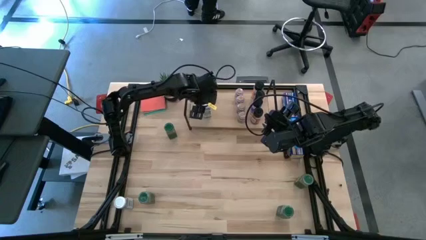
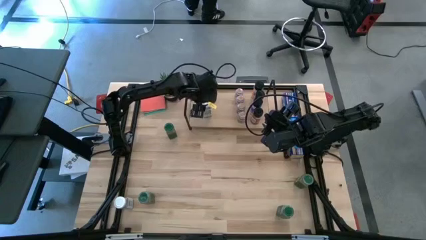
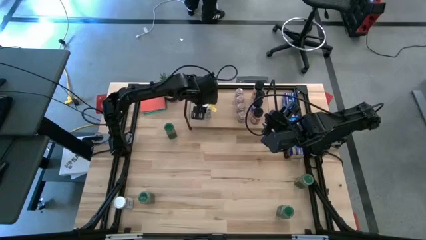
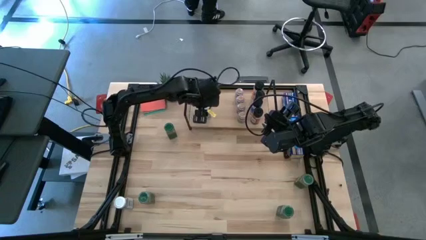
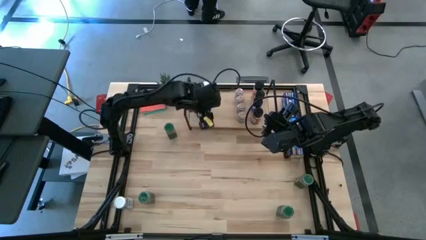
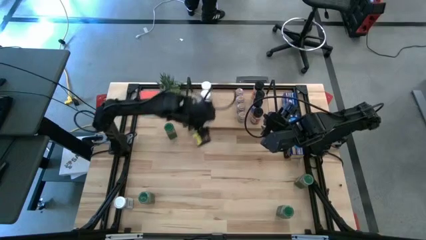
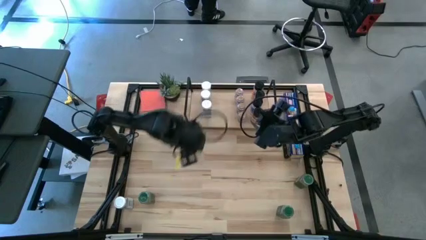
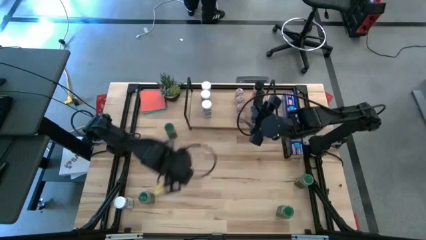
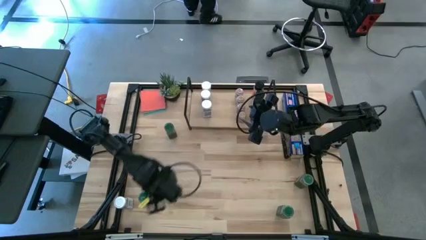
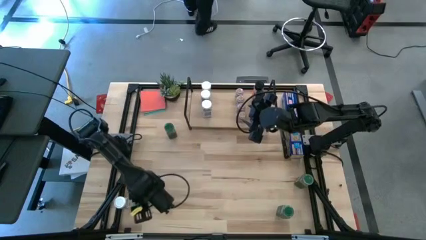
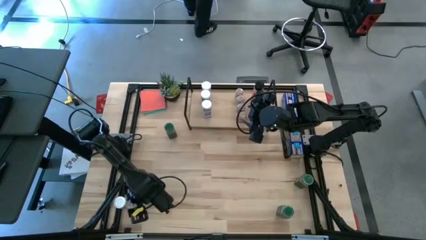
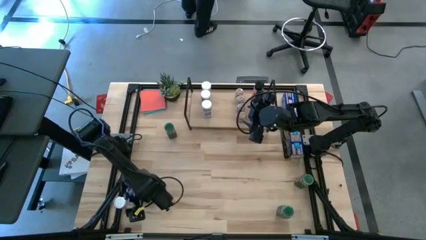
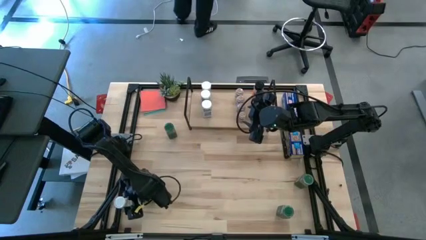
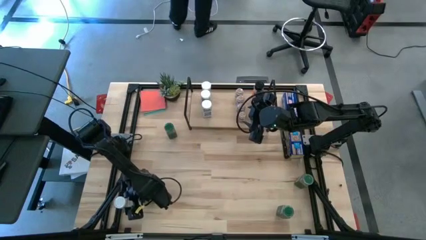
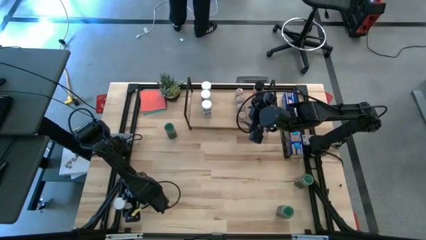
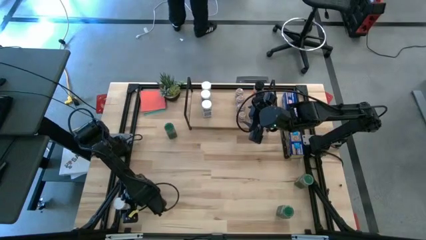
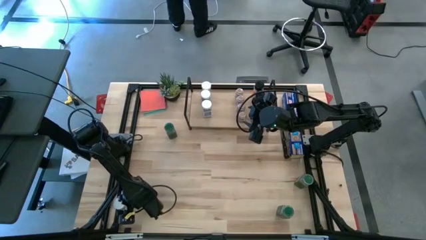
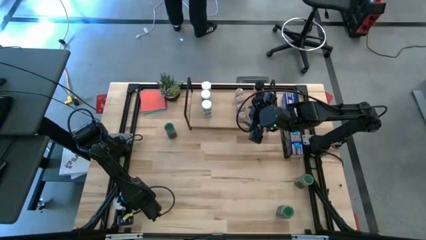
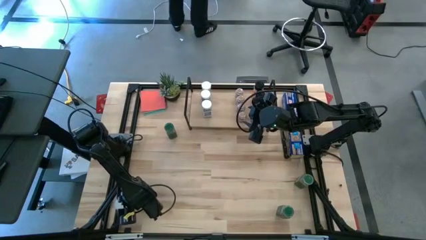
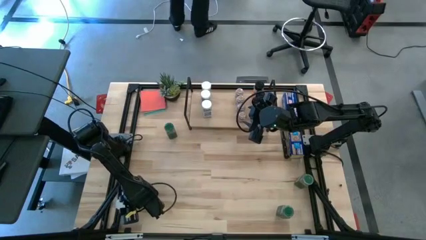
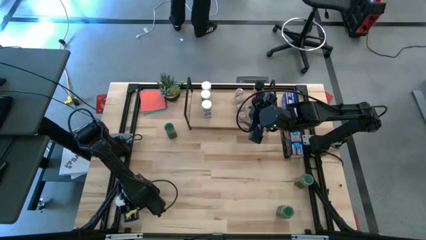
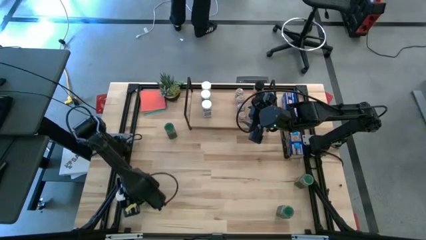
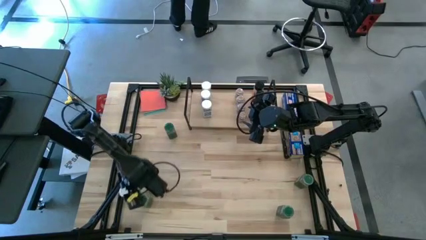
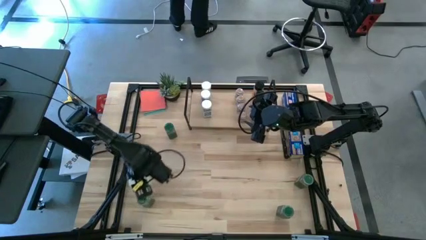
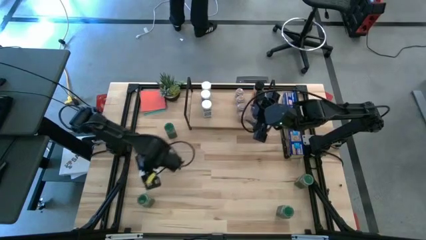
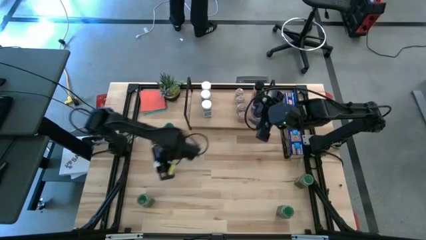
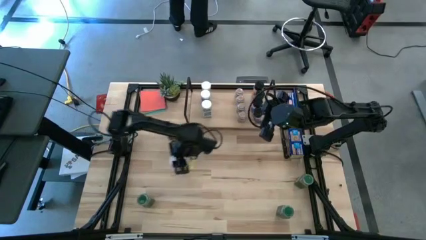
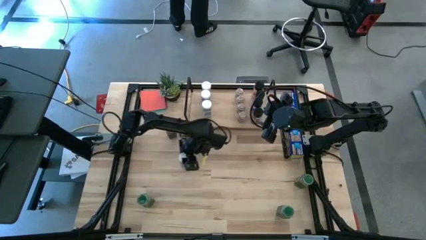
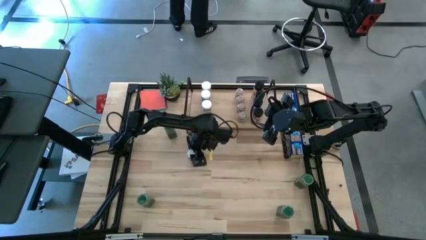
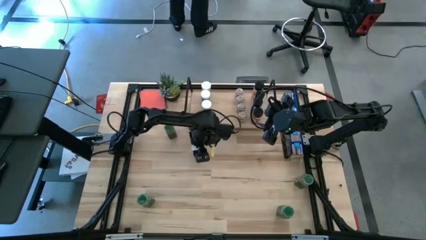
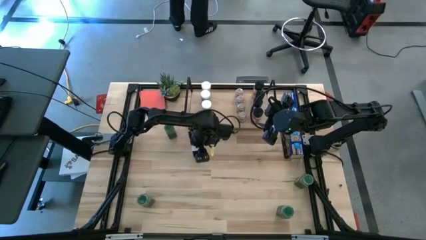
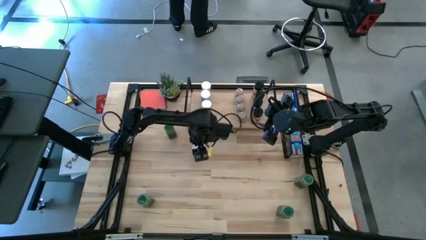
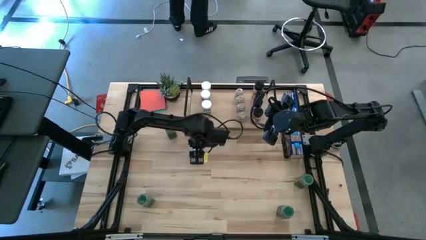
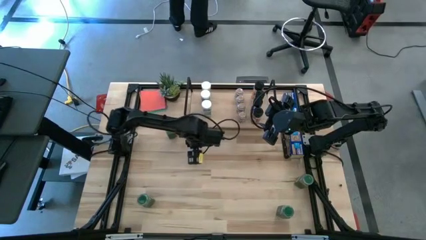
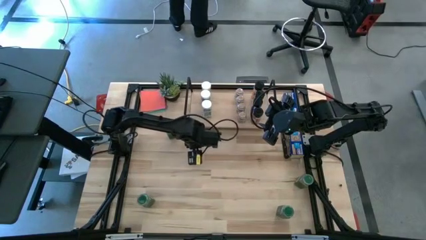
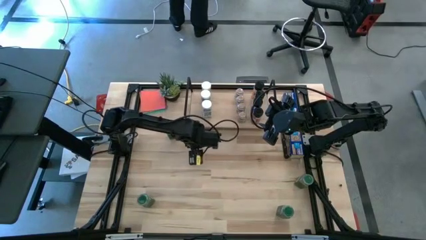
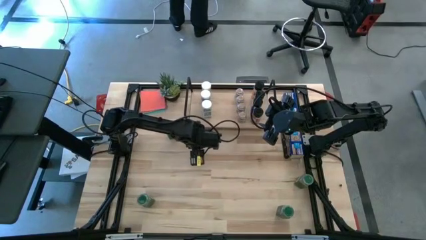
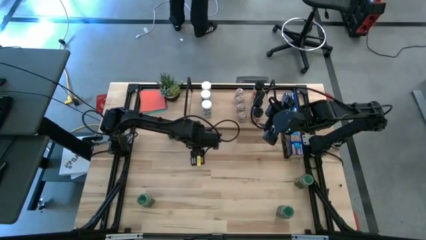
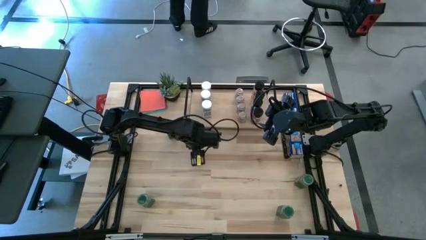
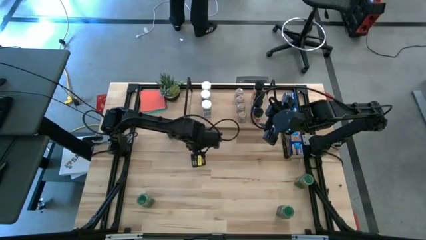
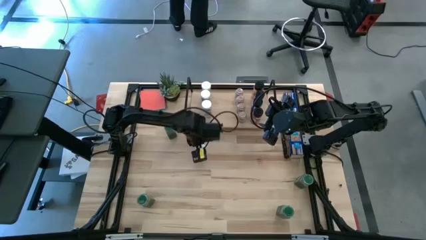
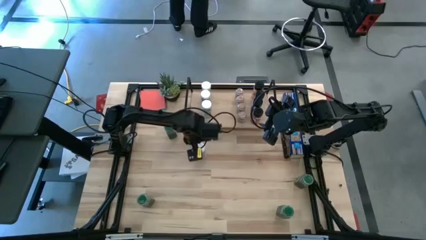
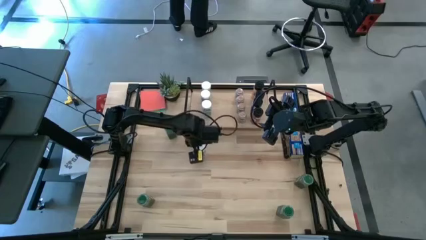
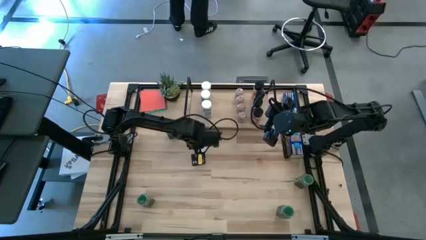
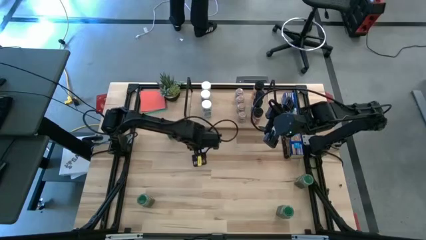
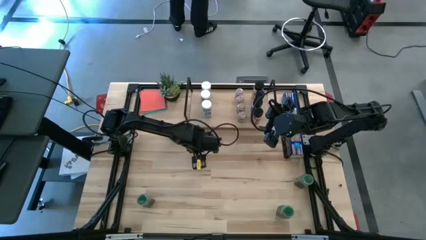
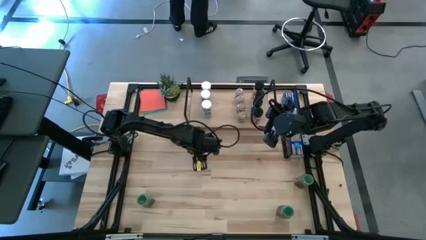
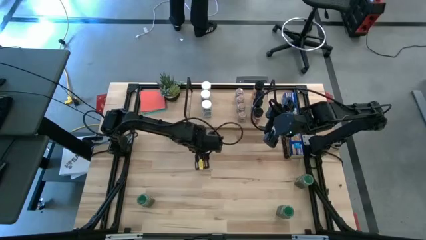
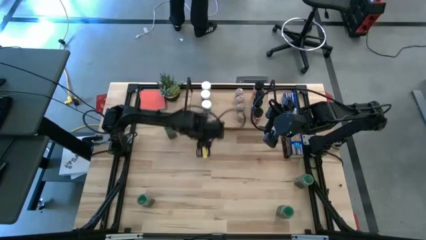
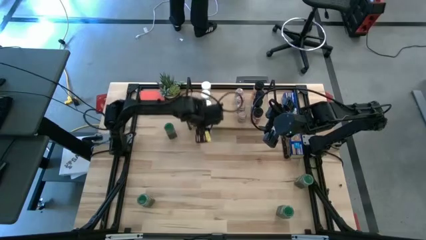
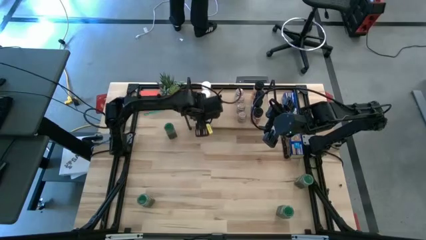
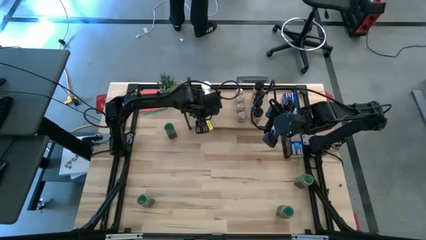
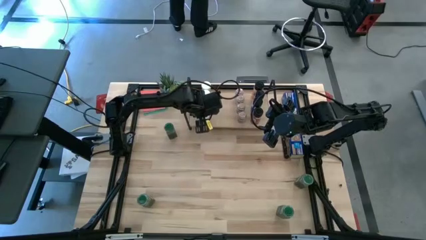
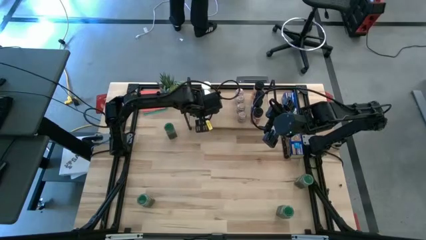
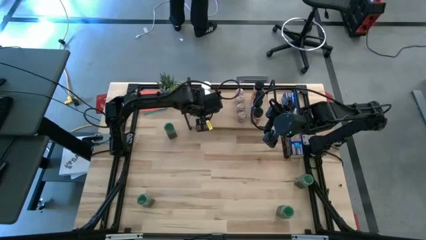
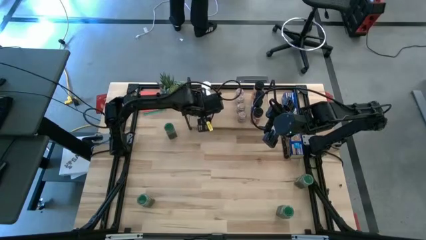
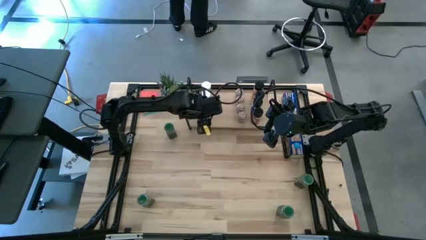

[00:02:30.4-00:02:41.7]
Task: Shelf spices
Put the white seasoning bottle on the shelf, aligned with the other white seasoning bottle

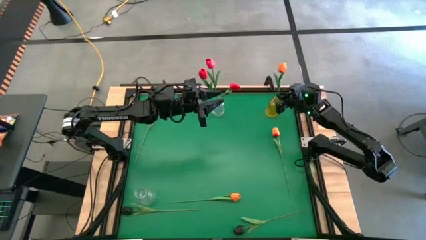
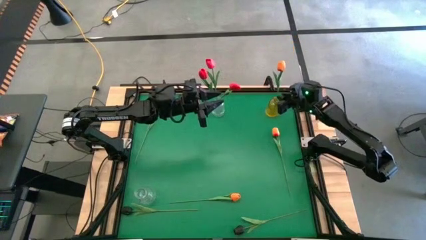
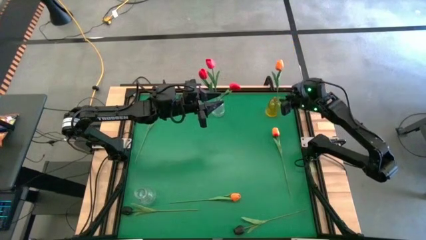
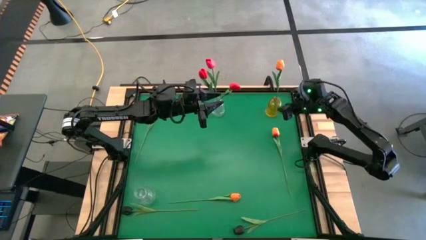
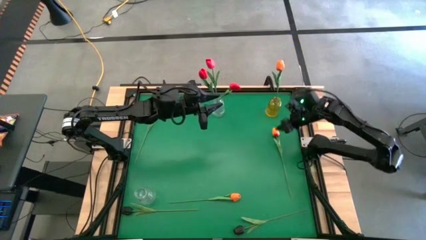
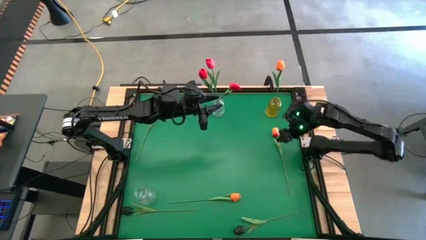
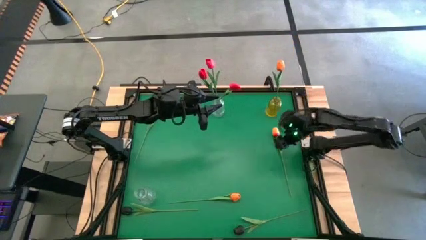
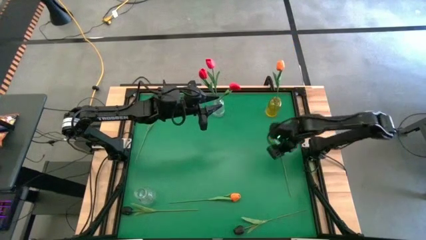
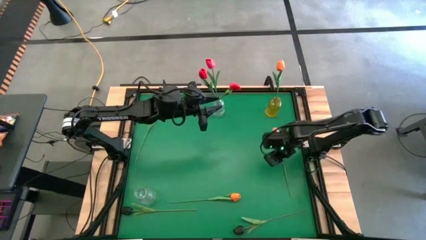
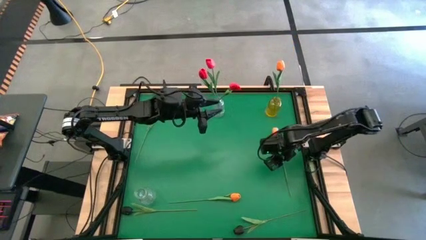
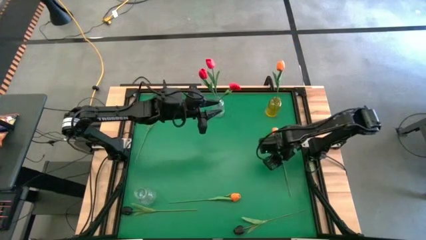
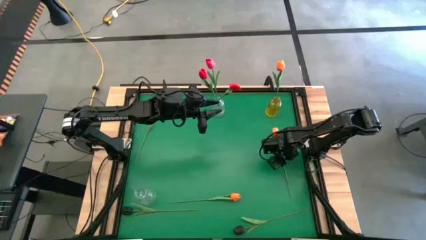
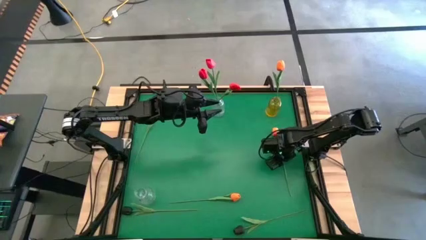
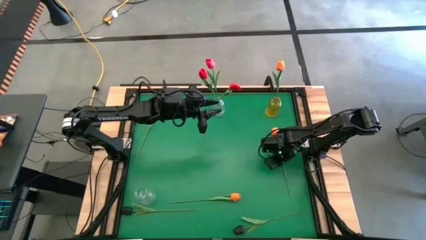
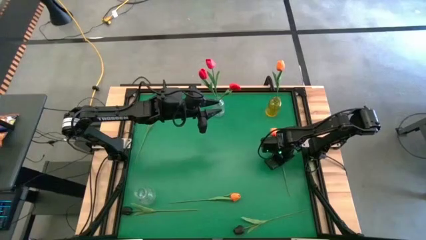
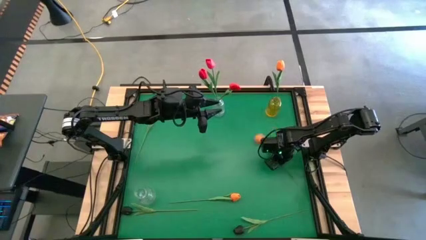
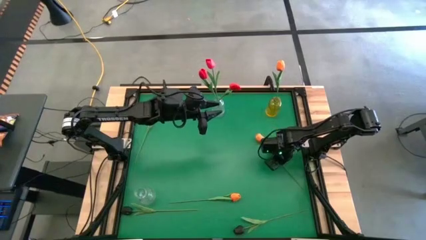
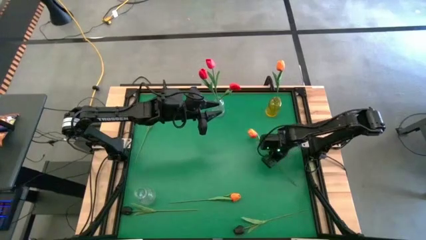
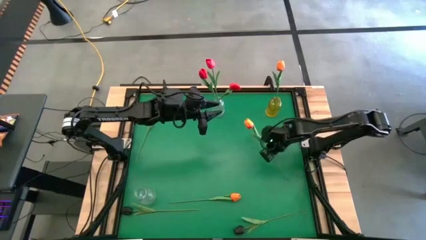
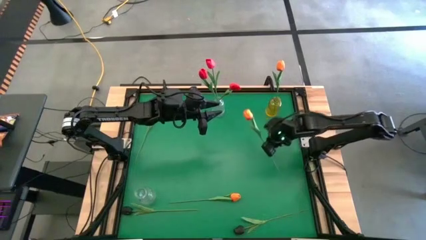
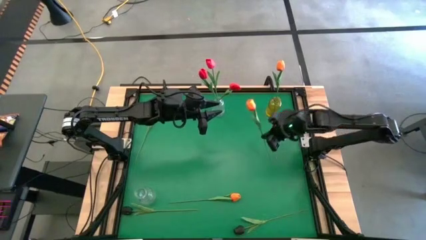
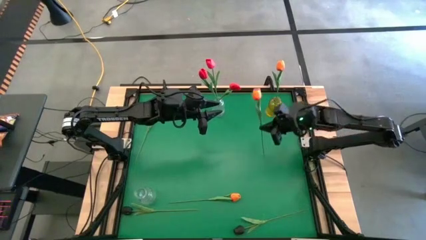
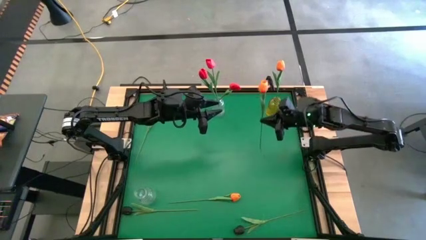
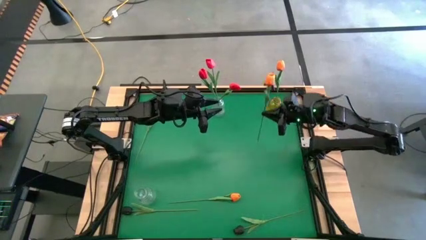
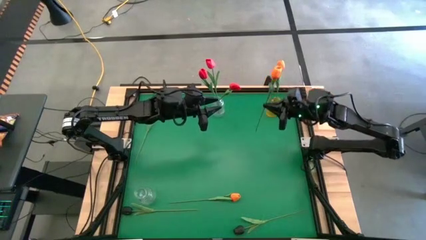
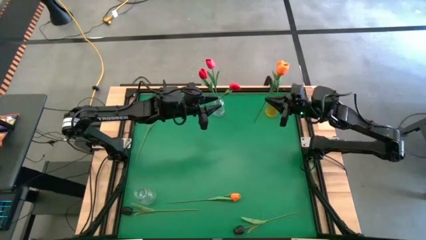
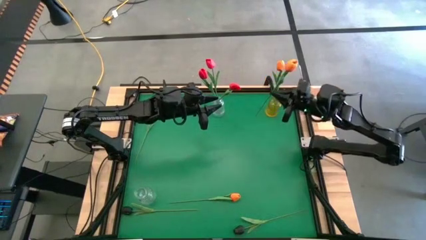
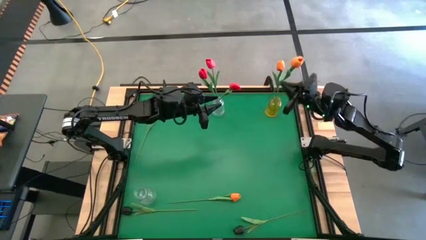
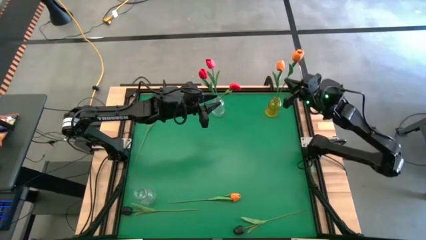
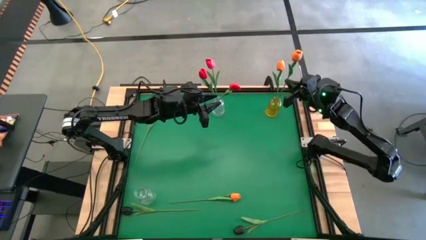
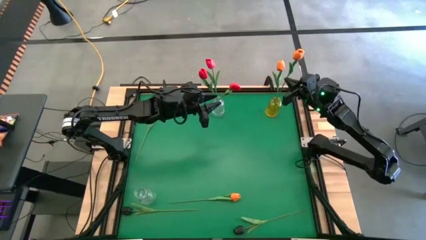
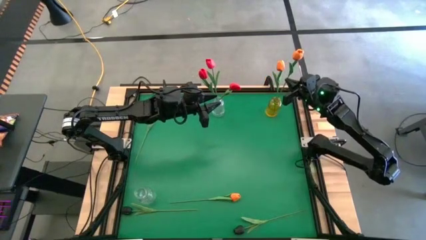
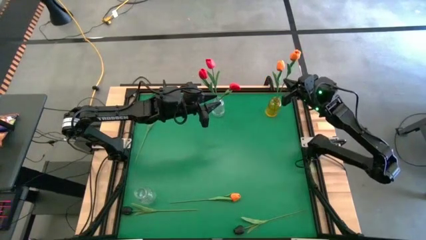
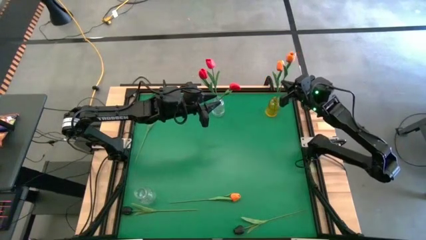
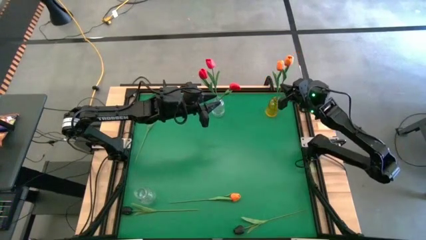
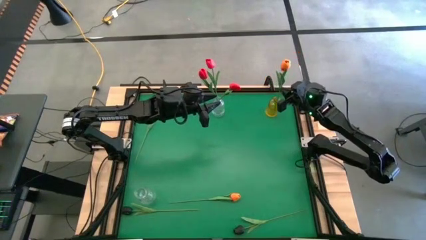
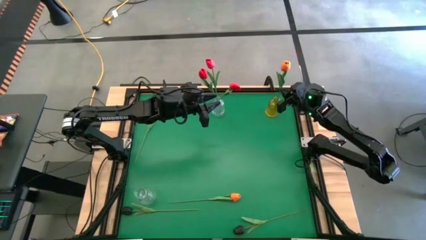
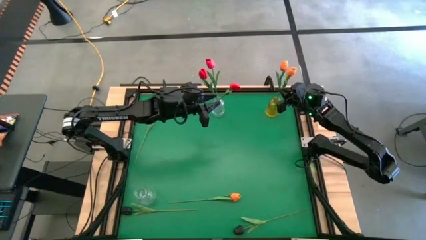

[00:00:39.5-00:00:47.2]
Task: Sort flowers into vase by color
Put the top orange flower into the yellow vase
